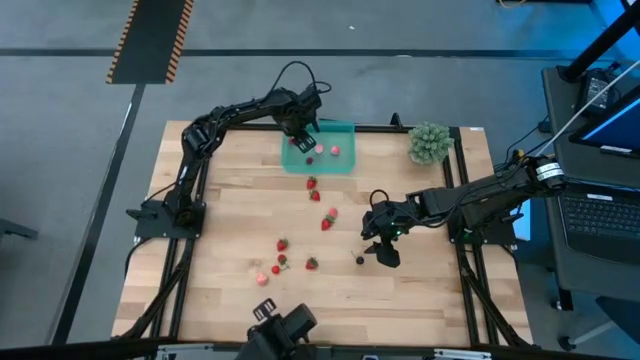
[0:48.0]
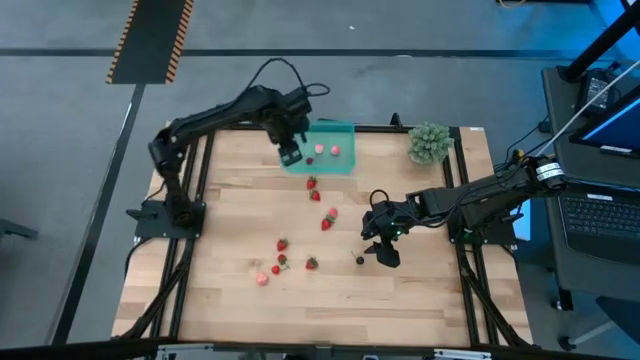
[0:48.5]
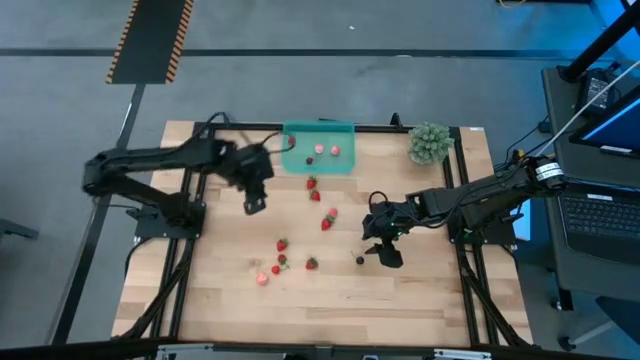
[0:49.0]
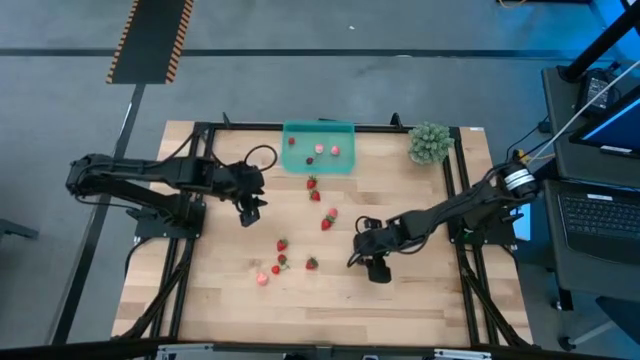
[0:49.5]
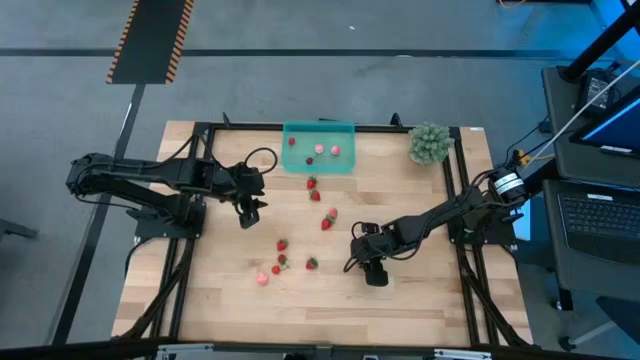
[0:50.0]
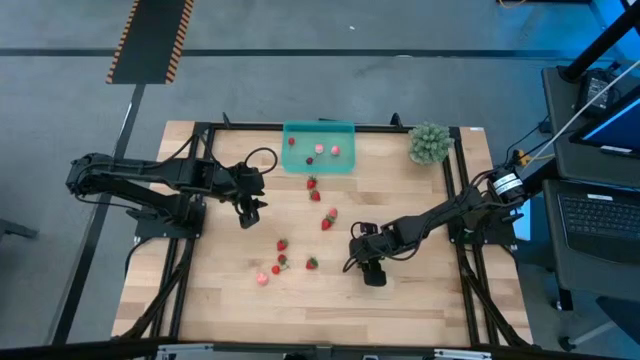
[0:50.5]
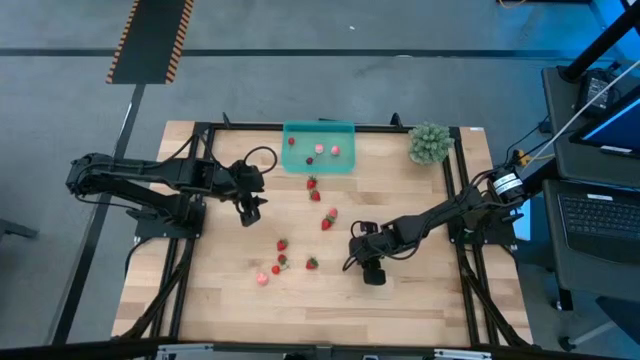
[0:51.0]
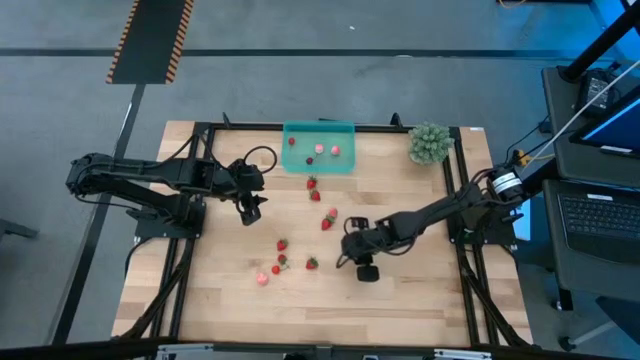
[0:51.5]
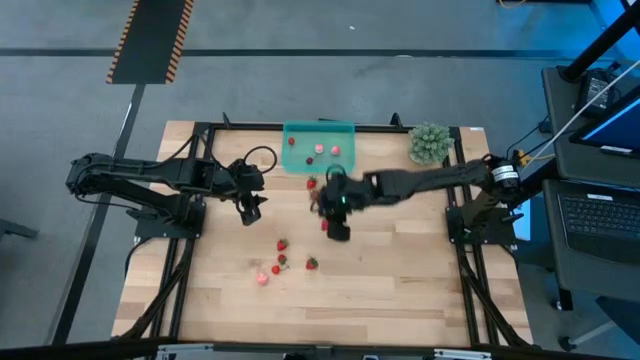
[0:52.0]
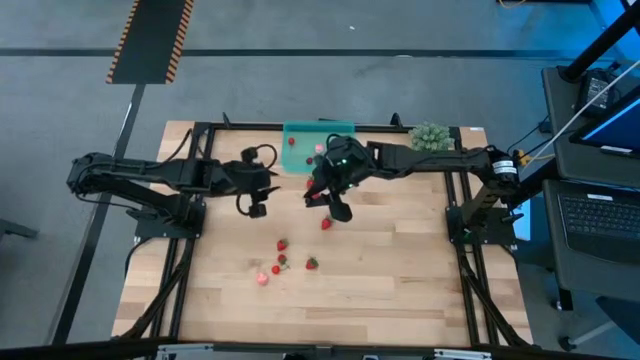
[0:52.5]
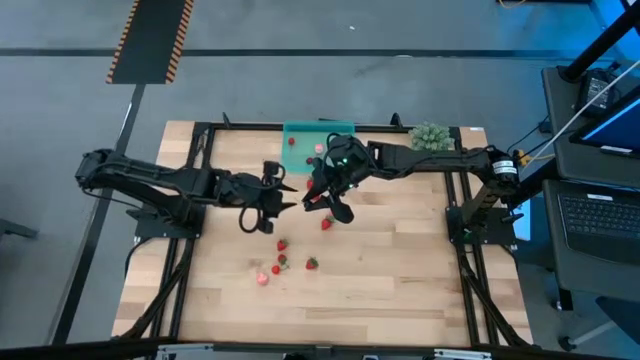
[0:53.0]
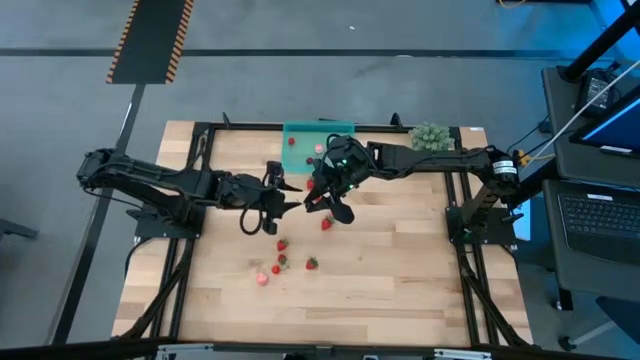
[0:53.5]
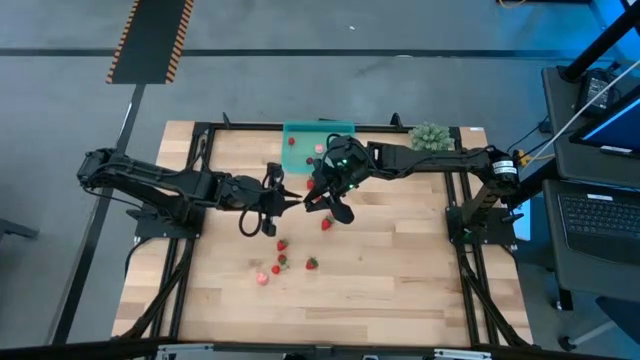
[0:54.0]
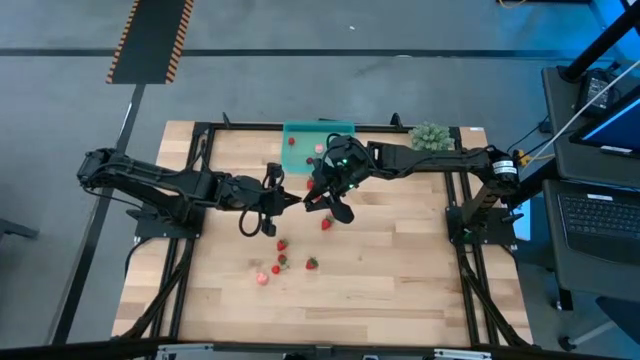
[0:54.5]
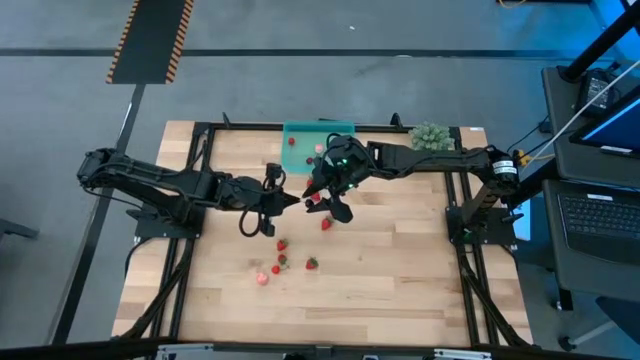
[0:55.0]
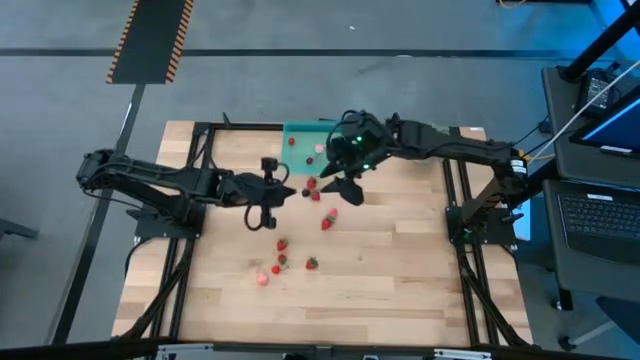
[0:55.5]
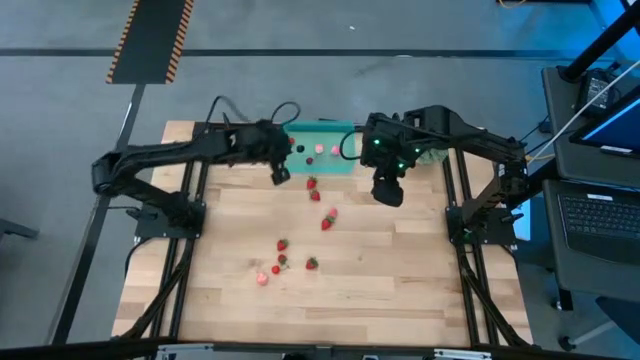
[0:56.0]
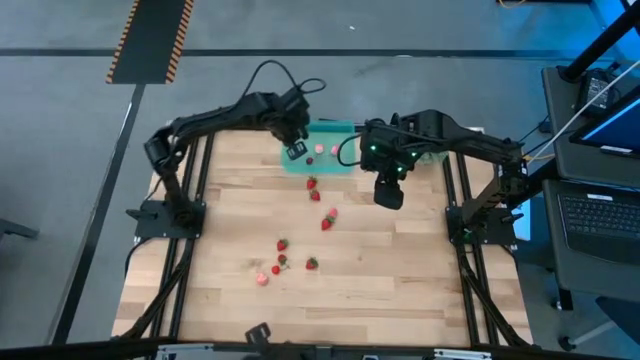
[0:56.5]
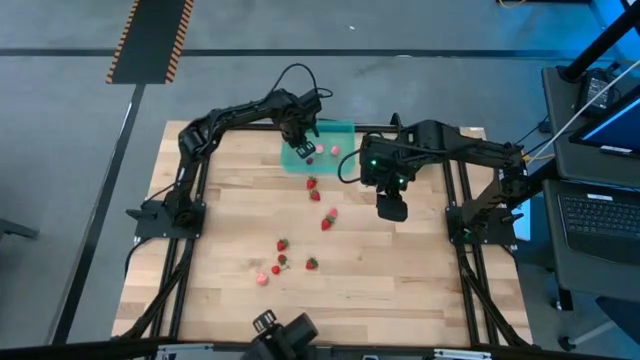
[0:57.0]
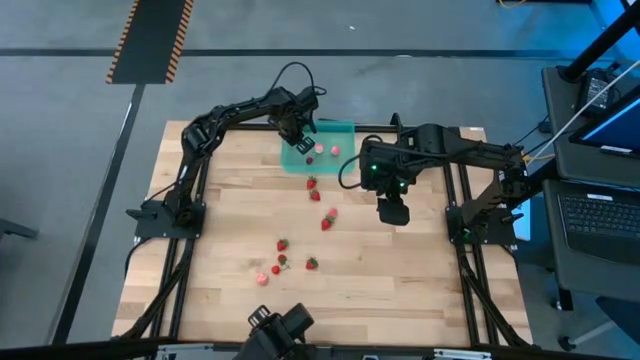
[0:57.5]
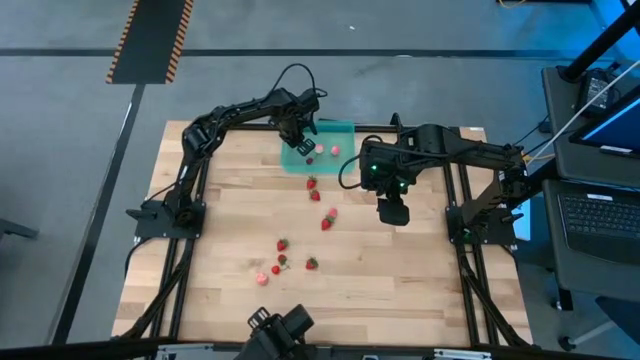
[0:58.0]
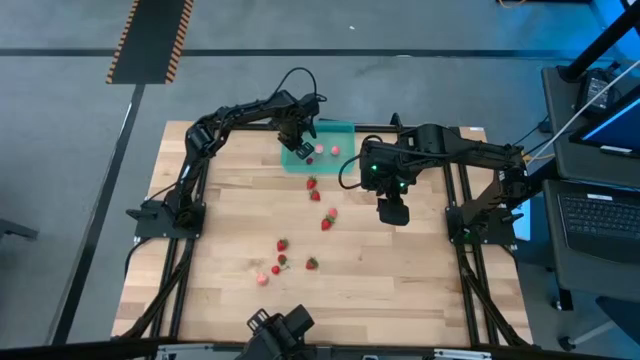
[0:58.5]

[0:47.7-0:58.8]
Task: Pick and placing Produce into tupperware
Put the black cherry into the green container

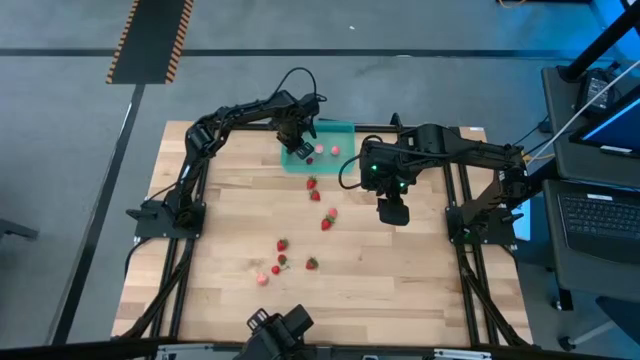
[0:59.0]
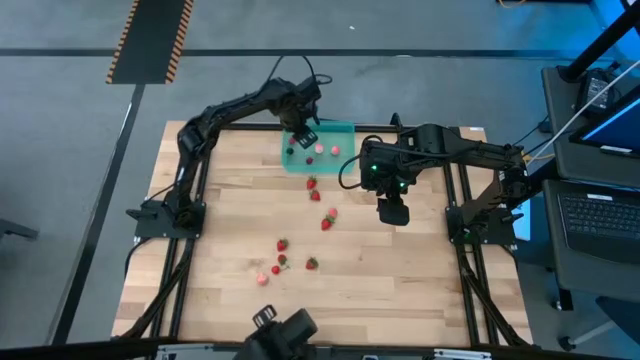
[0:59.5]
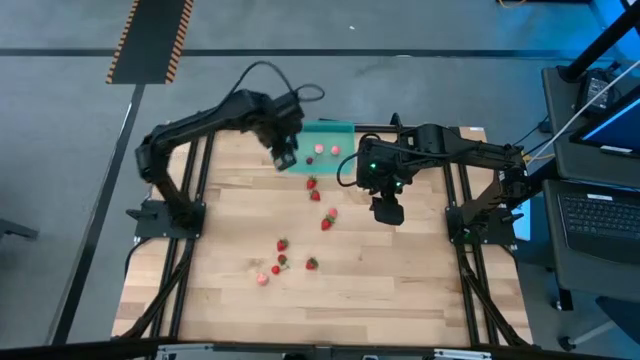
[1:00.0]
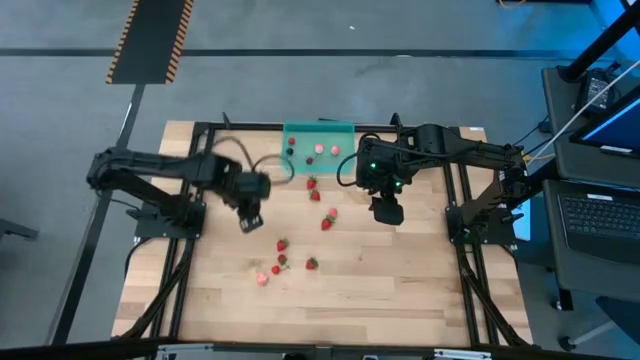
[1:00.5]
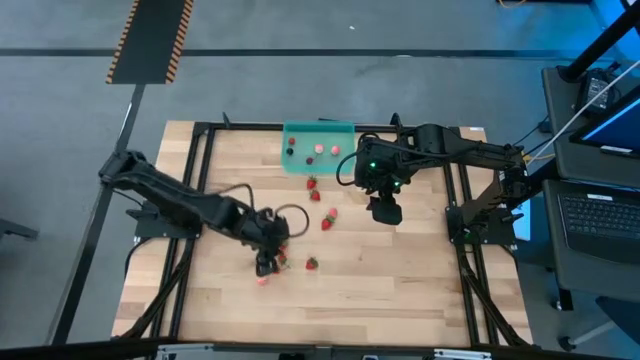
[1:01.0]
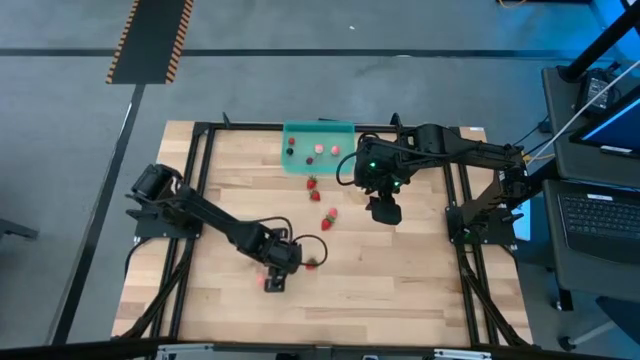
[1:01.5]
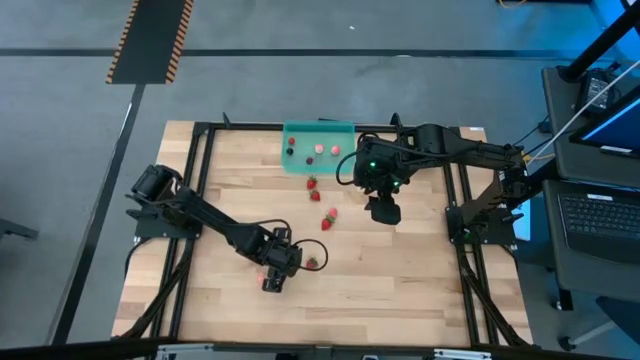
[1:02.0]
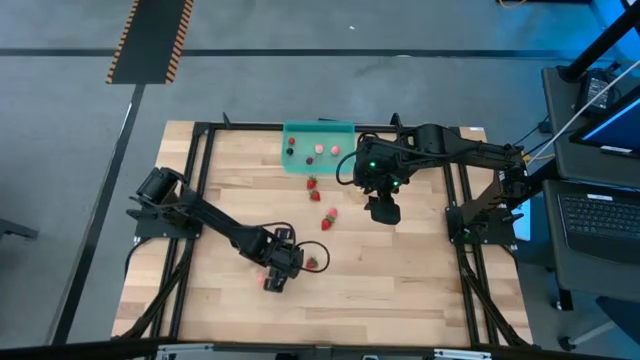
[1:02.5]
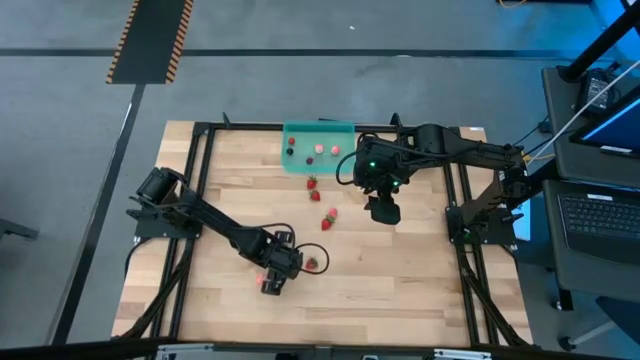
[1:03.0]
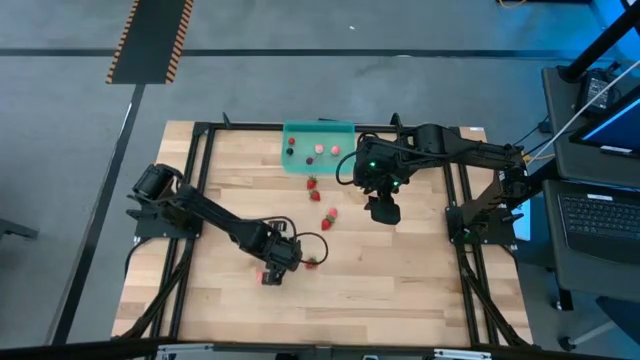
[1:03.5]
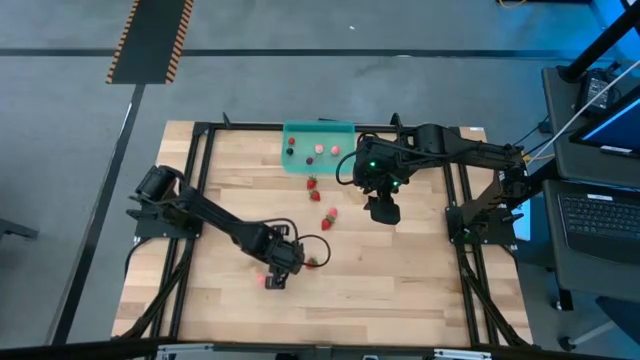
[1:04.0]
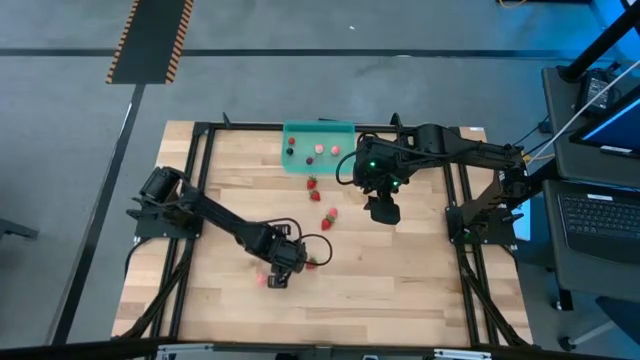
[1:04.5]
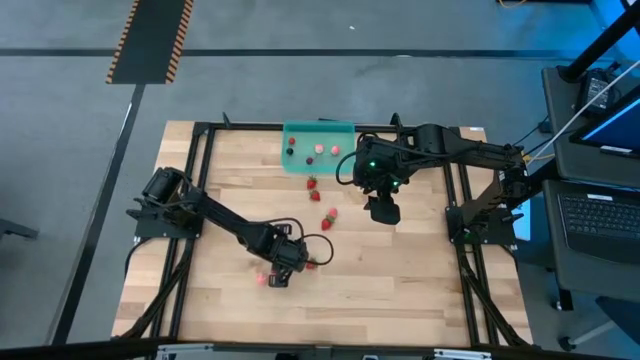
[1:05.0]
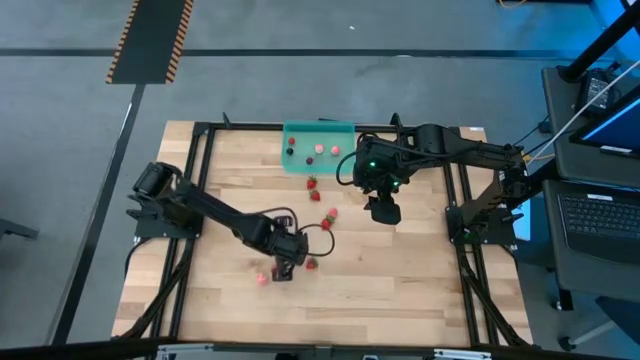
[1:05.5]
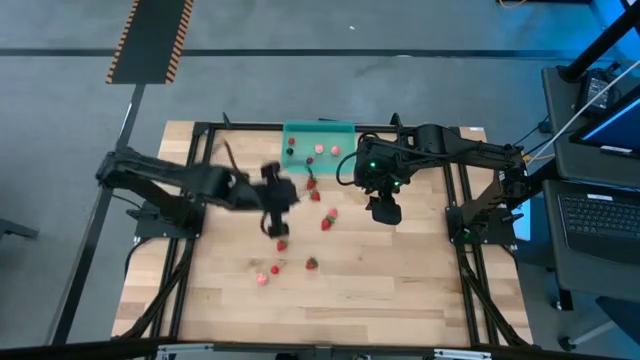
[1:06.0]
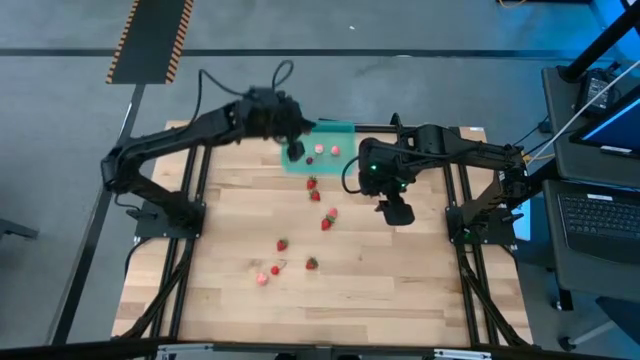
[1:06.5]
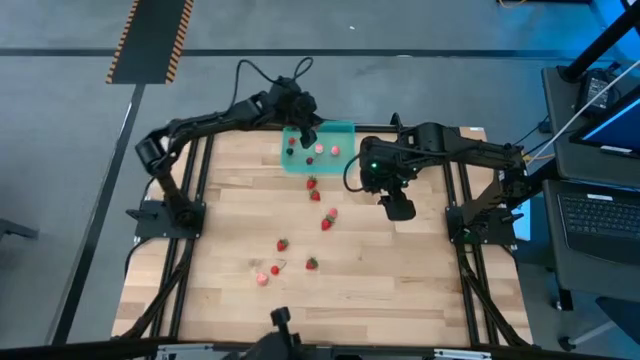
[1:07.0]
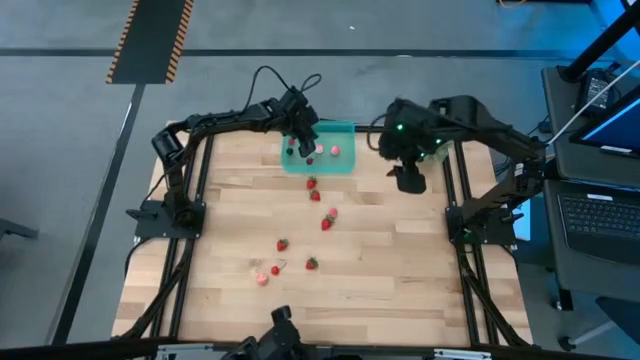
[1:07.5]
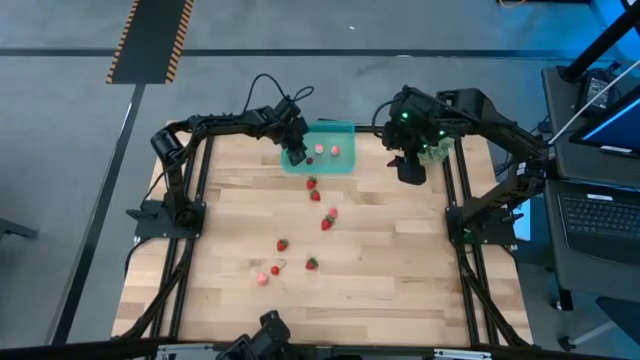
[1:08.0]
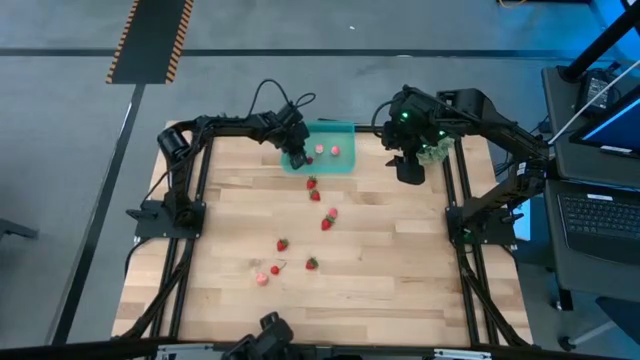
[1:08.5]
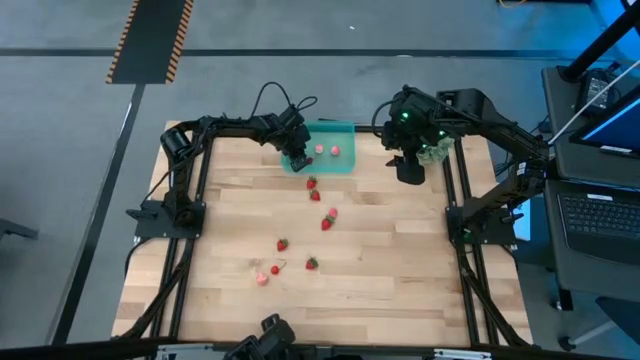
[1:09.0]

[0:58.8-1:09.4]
Put the red strawberry into the green container
